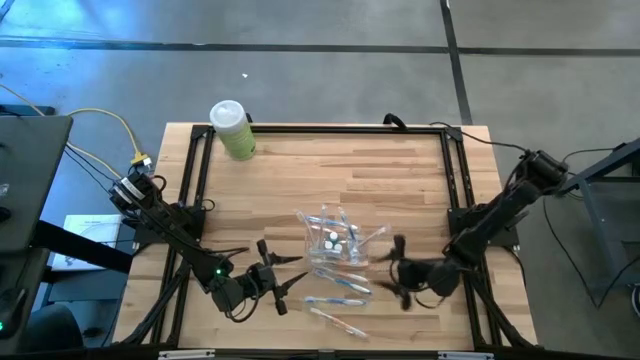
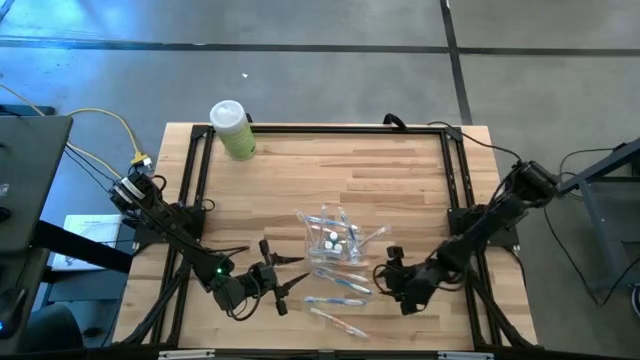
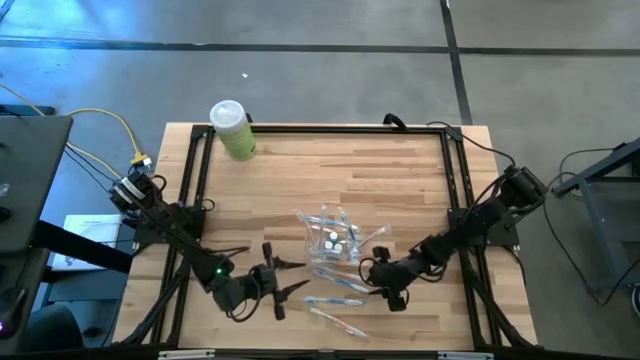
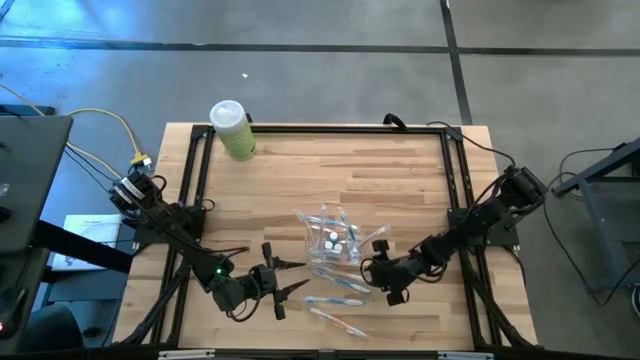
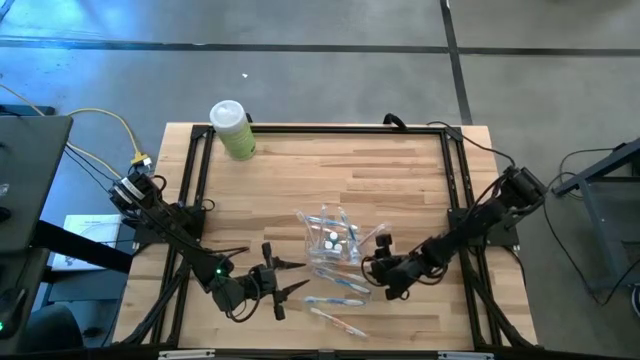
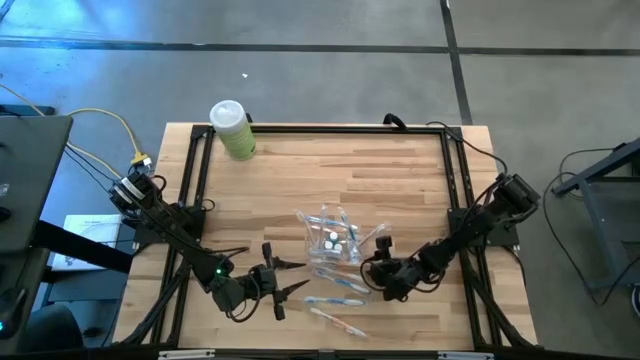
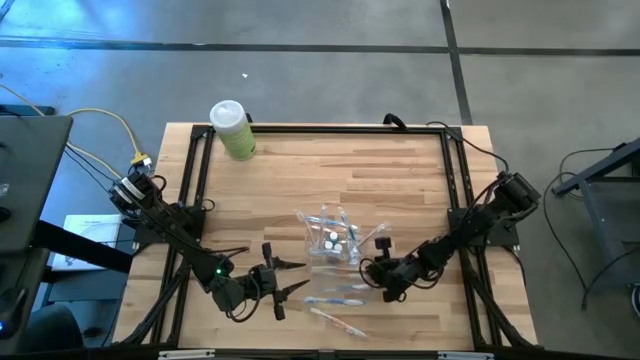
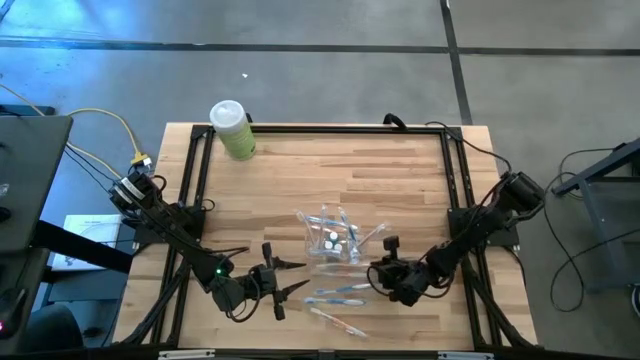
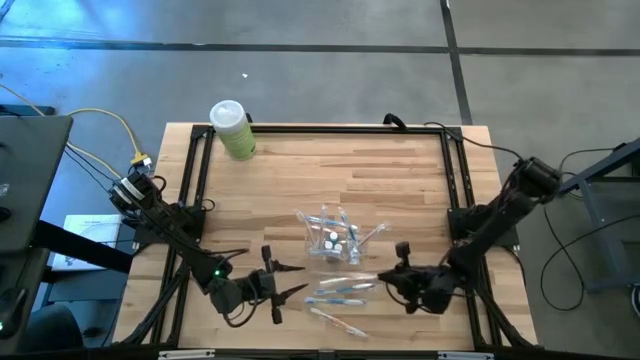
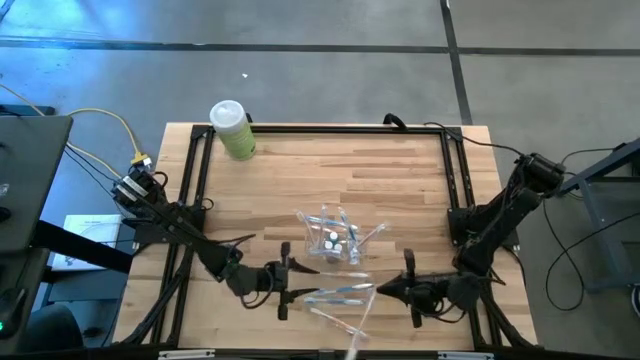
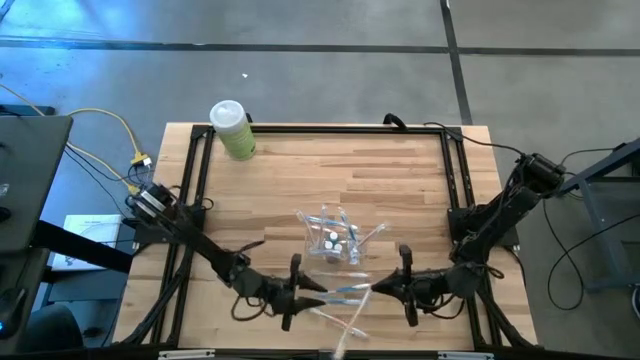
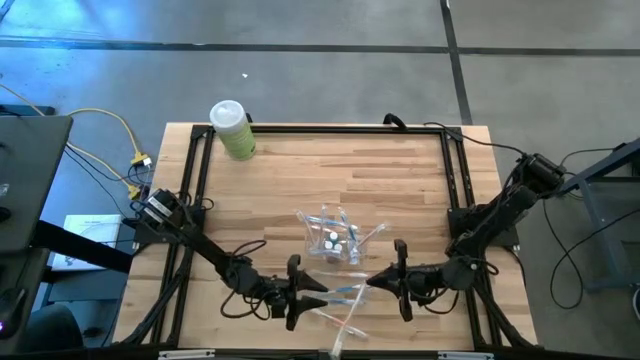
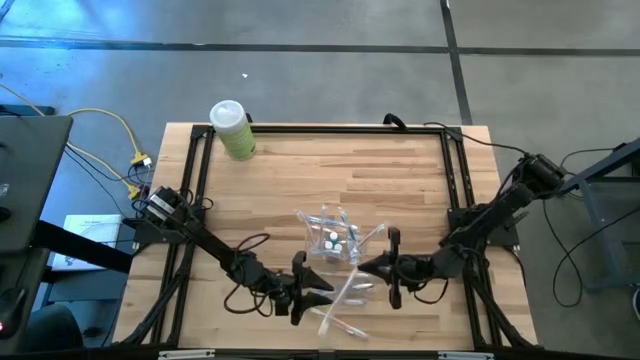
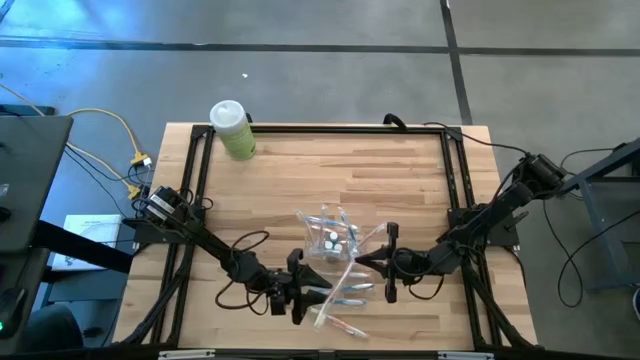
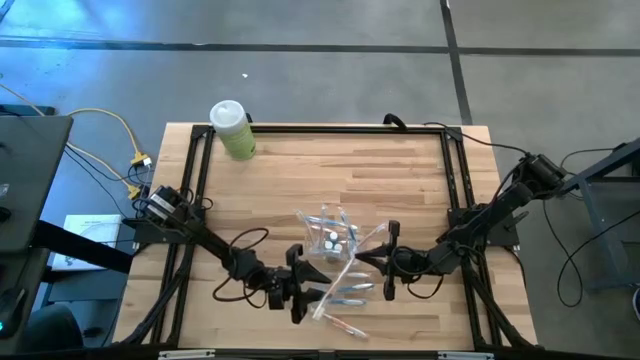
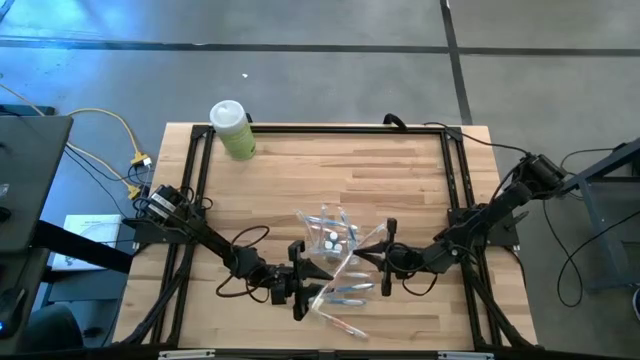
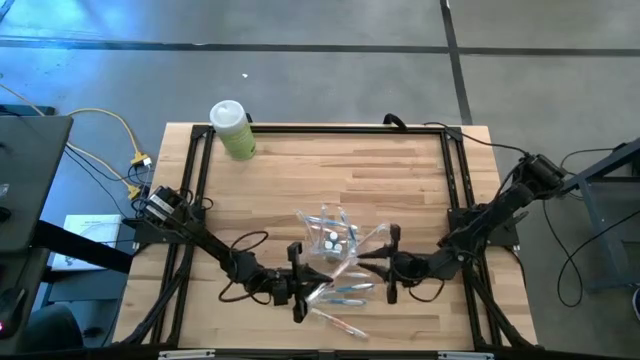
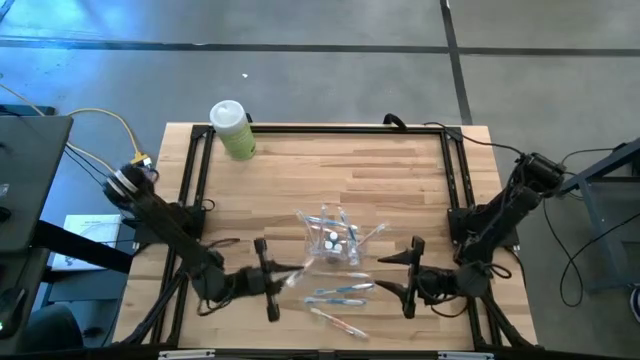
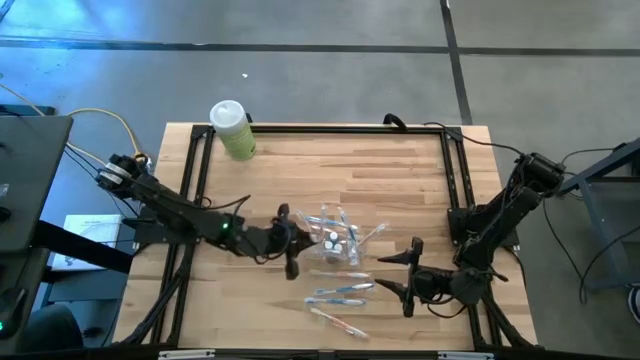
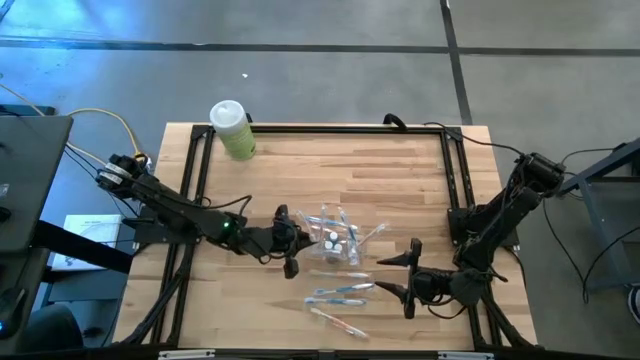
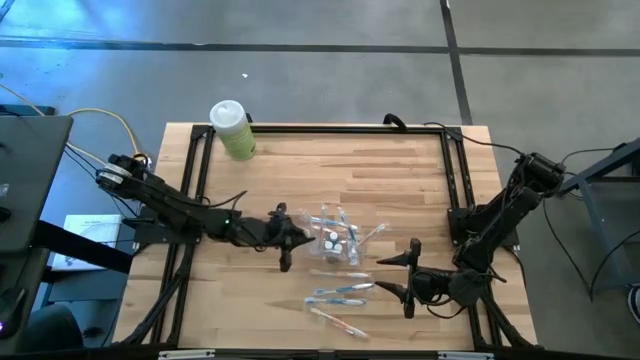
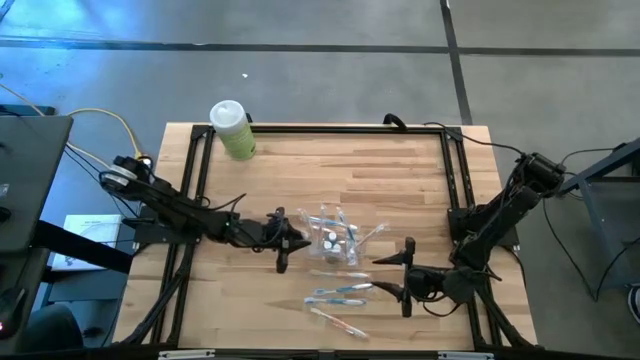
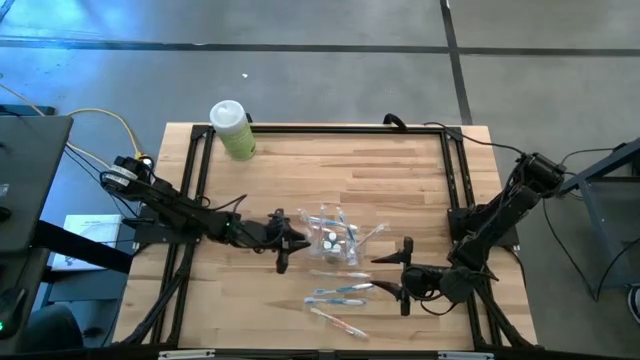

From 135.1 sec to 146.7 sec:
Task: Pick & Place toothbrushing station
Put the orange toothbrush into the transparent organizer

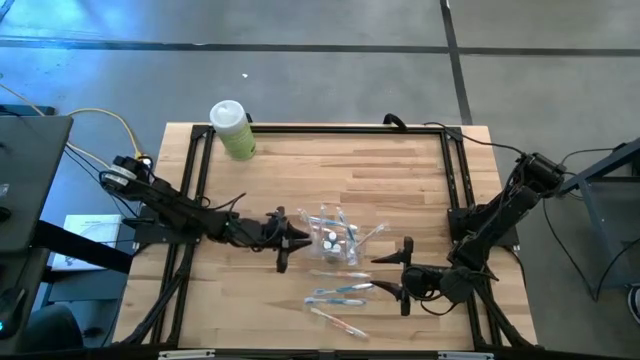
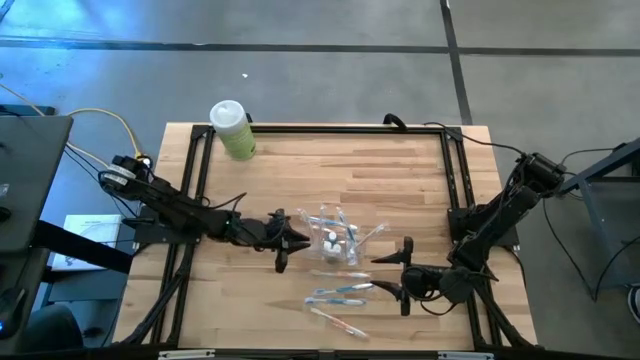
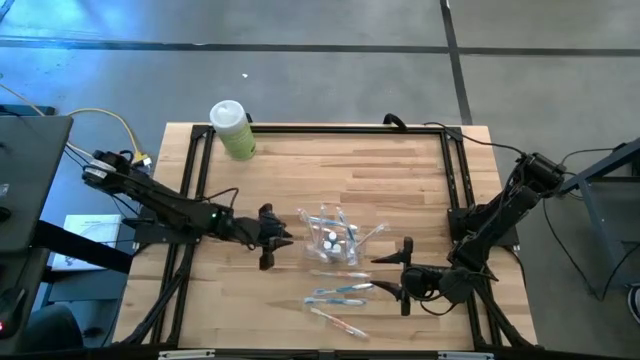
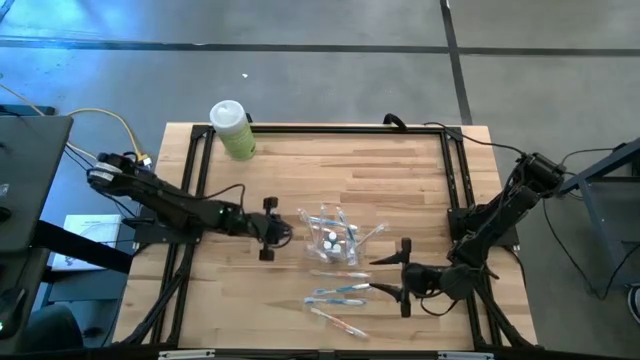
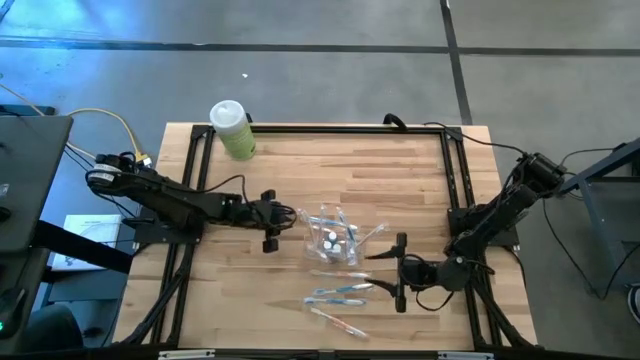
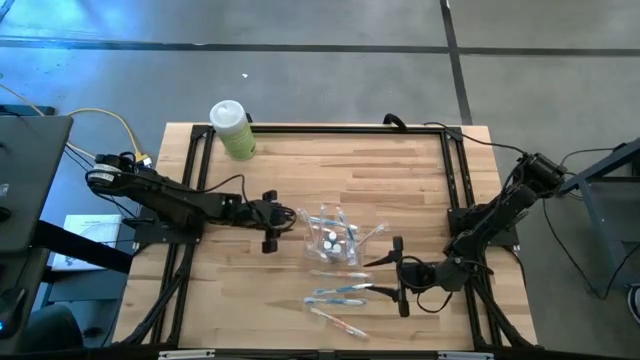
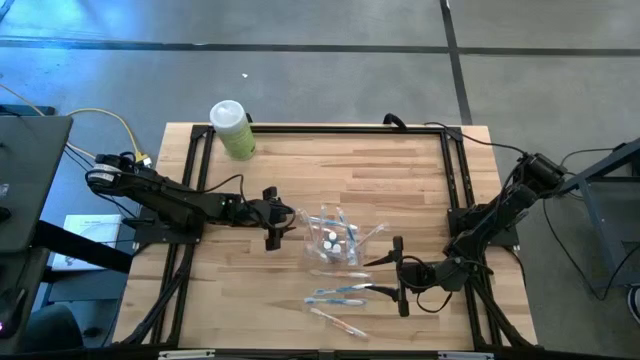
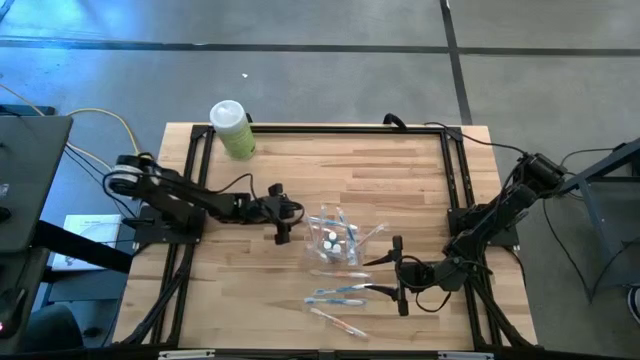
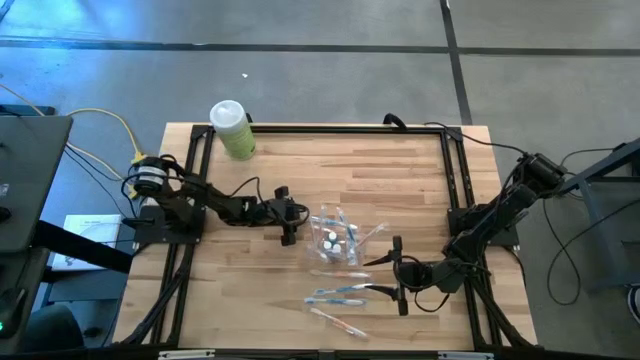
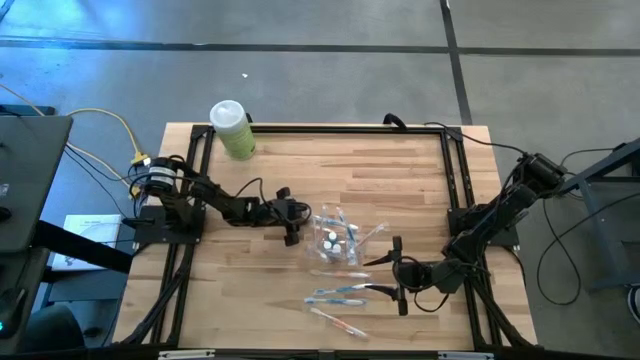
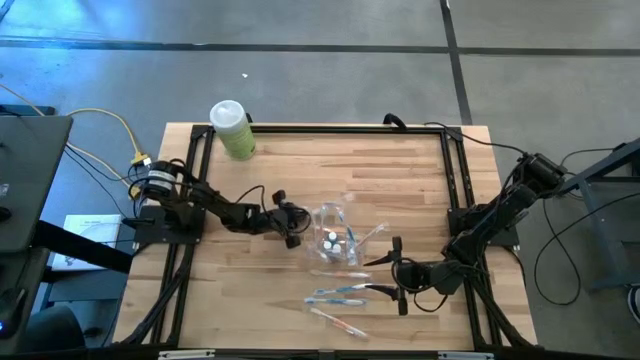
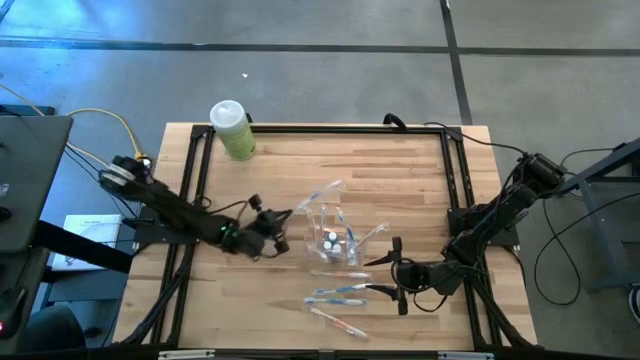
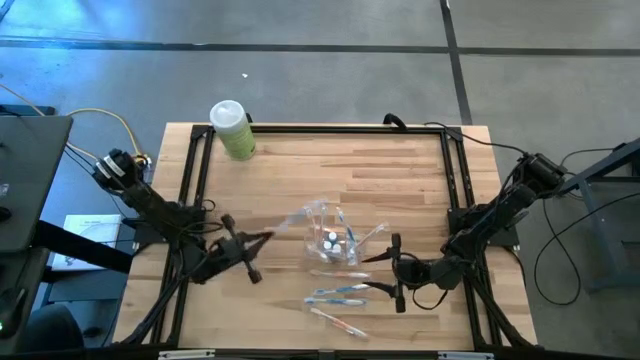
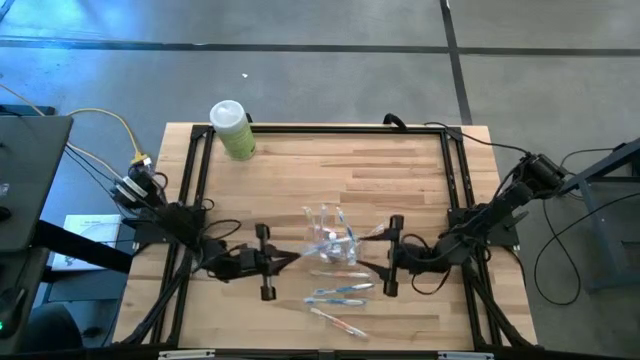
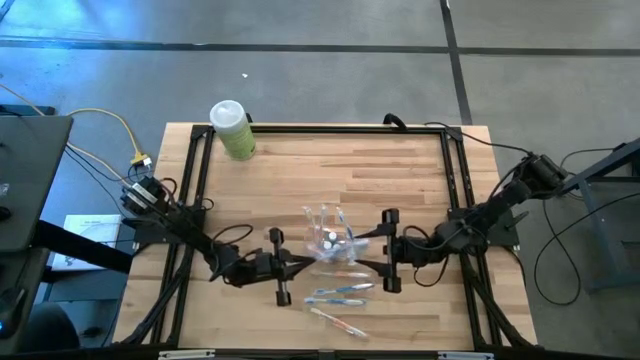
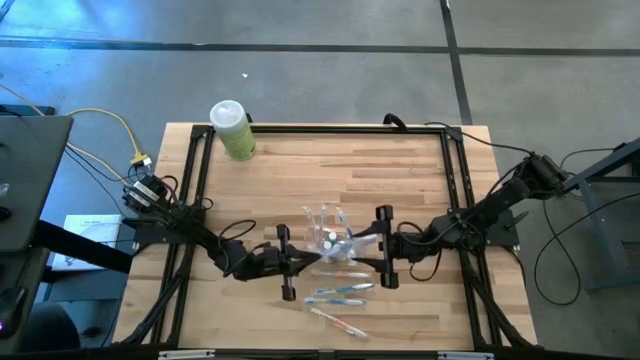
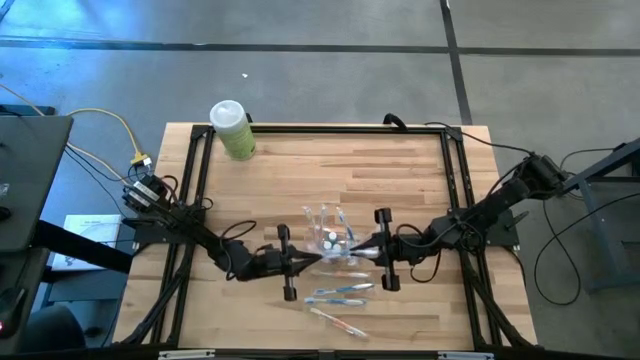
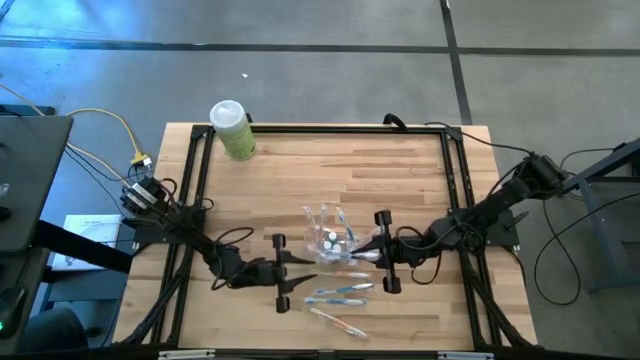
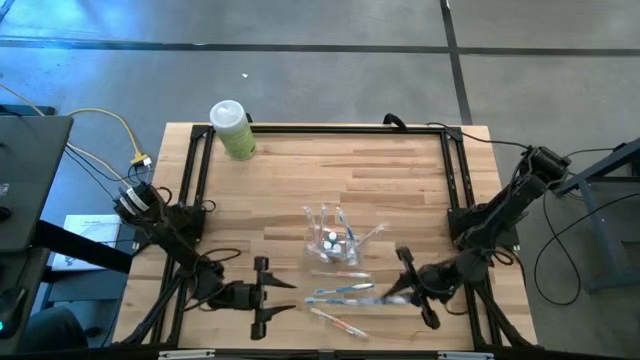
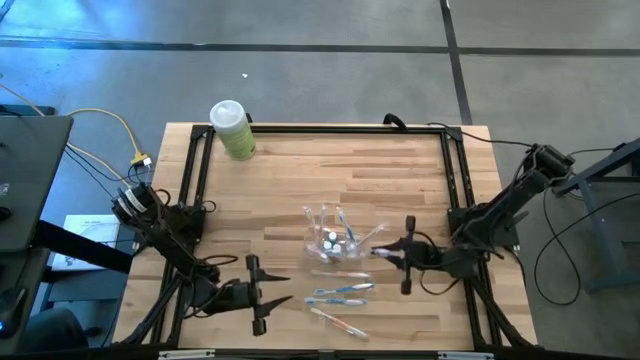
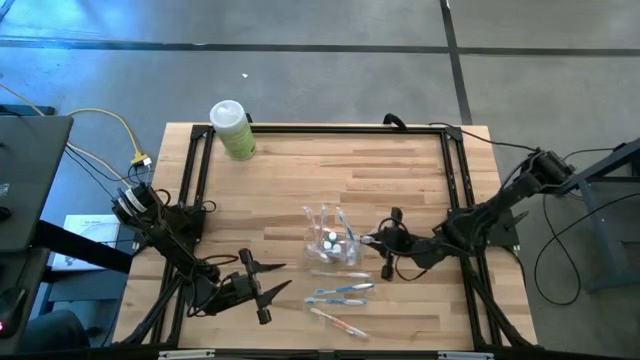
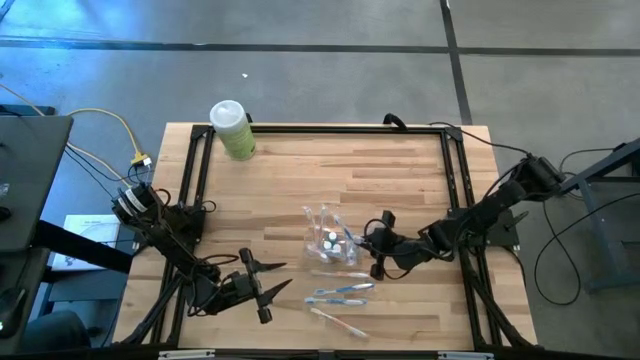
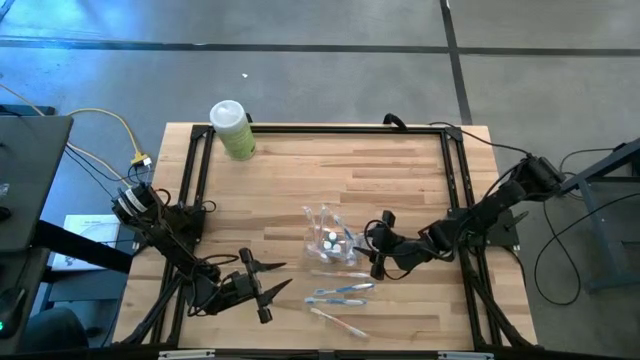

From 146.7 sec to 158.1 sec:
Put the blue toothbrush into the transparent organizer
